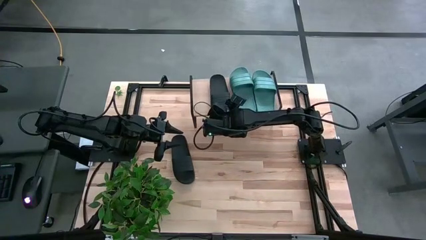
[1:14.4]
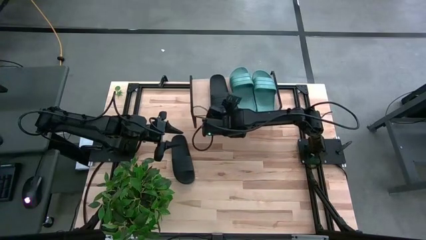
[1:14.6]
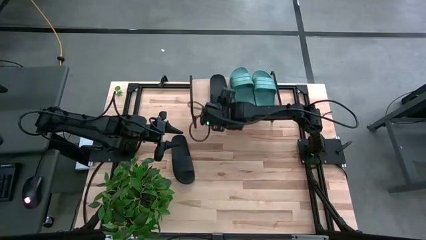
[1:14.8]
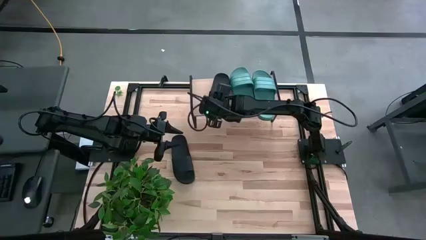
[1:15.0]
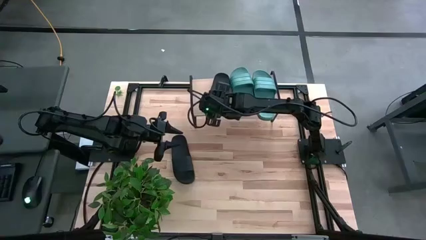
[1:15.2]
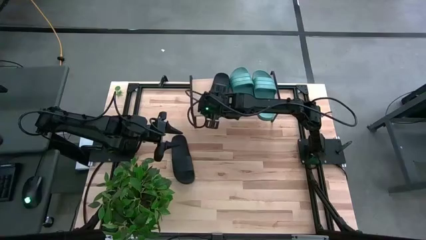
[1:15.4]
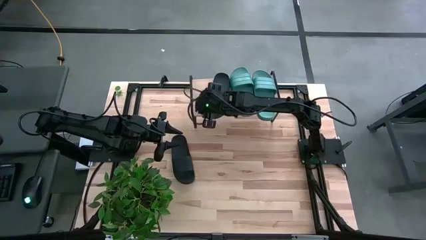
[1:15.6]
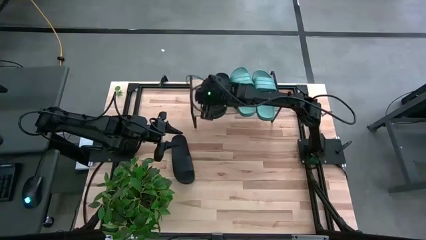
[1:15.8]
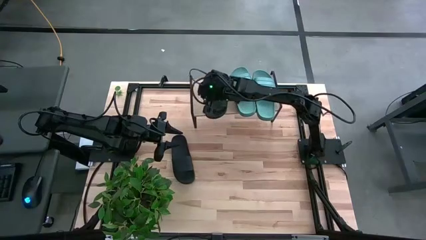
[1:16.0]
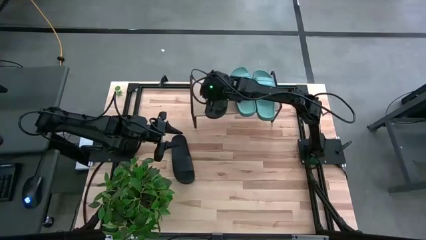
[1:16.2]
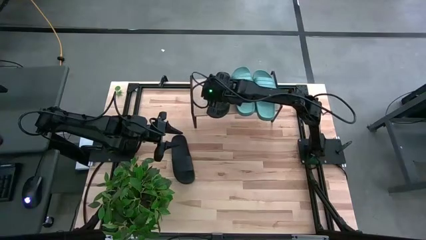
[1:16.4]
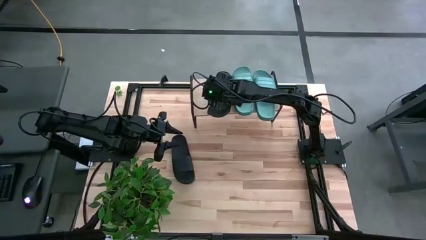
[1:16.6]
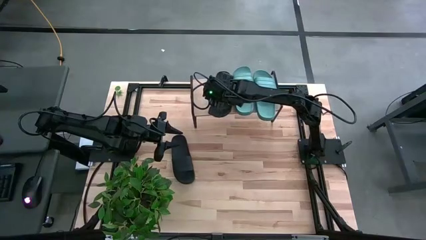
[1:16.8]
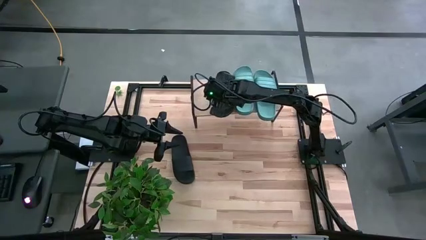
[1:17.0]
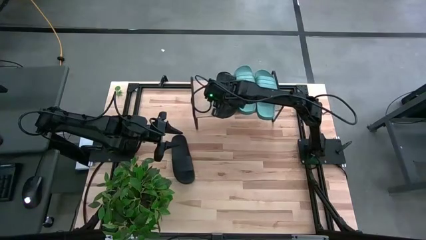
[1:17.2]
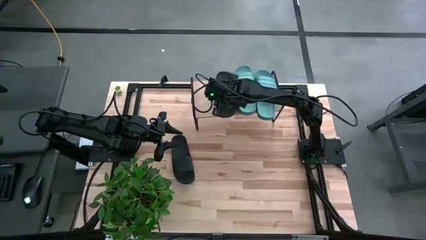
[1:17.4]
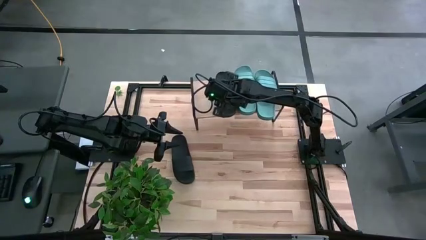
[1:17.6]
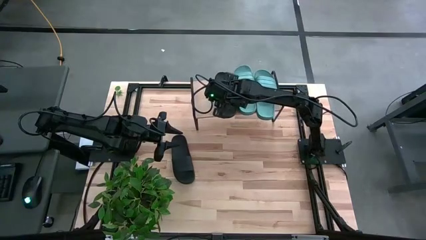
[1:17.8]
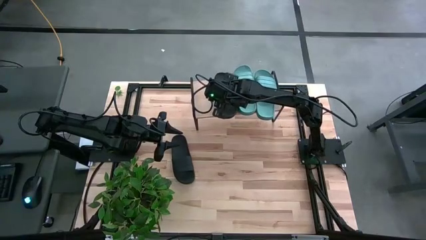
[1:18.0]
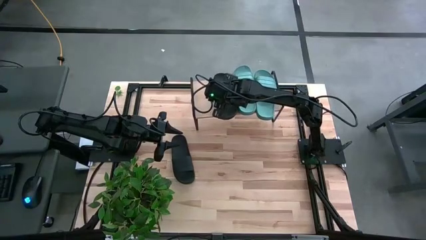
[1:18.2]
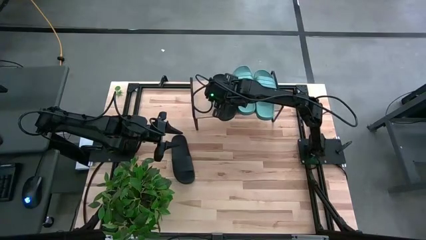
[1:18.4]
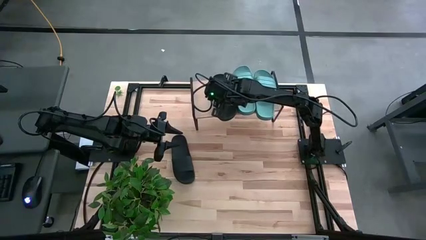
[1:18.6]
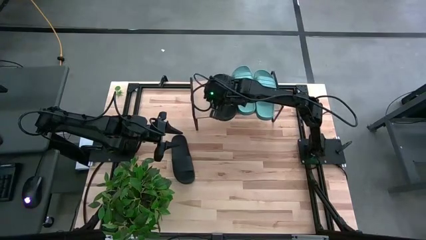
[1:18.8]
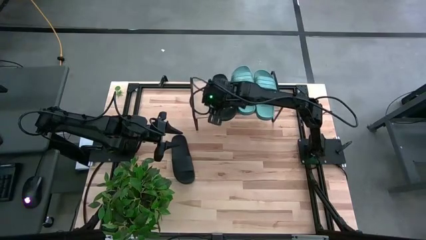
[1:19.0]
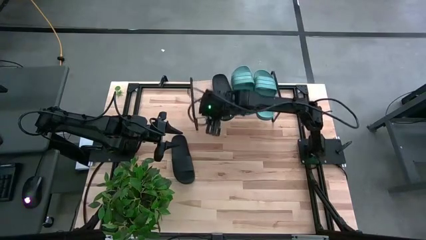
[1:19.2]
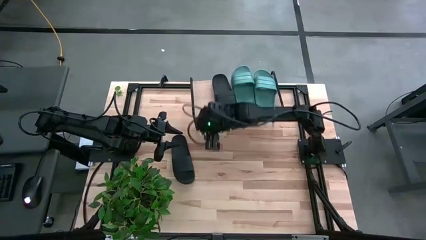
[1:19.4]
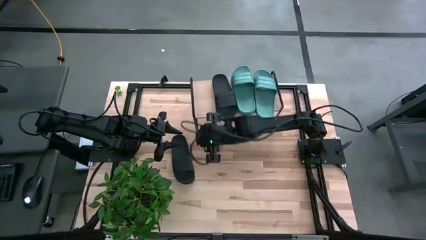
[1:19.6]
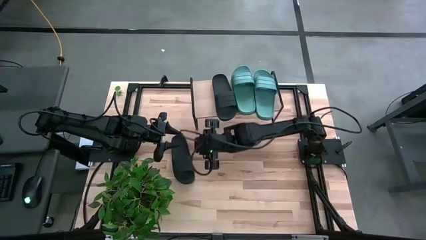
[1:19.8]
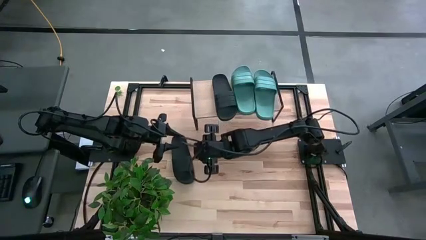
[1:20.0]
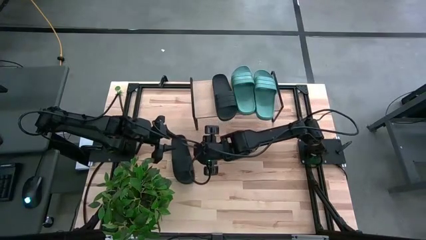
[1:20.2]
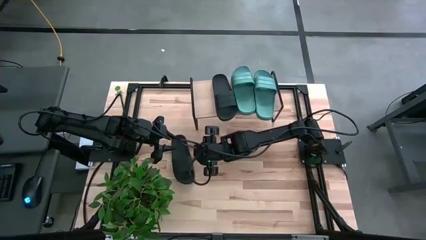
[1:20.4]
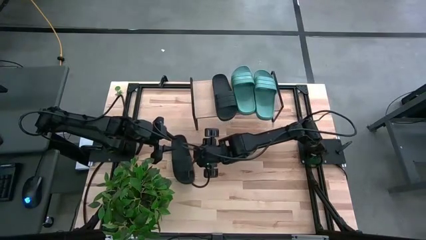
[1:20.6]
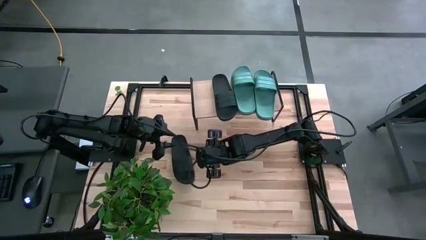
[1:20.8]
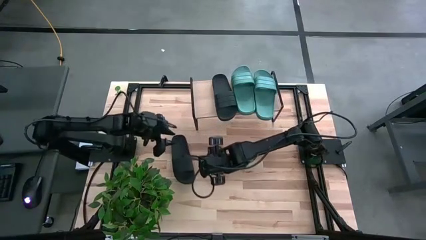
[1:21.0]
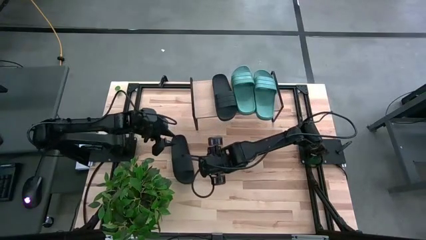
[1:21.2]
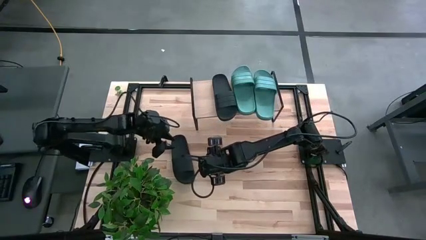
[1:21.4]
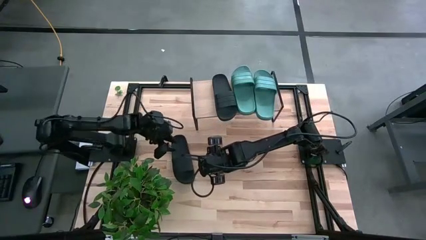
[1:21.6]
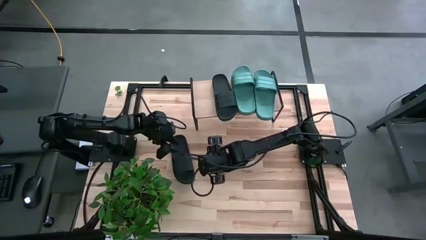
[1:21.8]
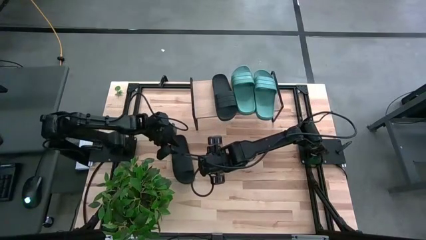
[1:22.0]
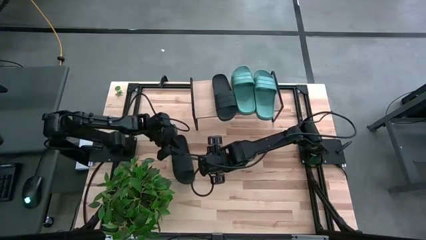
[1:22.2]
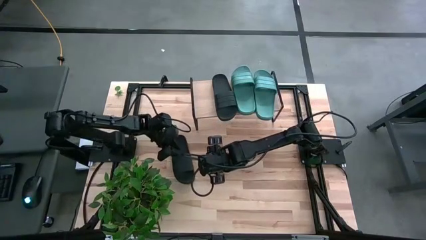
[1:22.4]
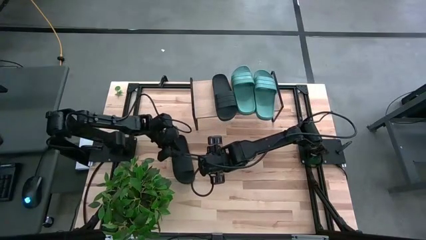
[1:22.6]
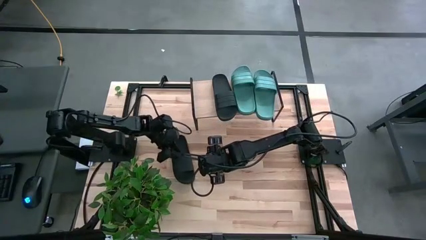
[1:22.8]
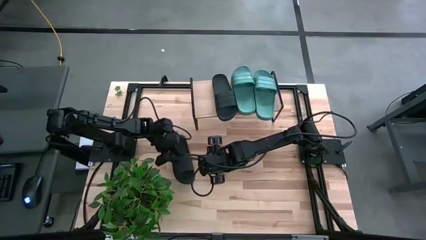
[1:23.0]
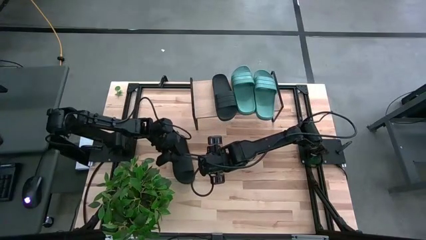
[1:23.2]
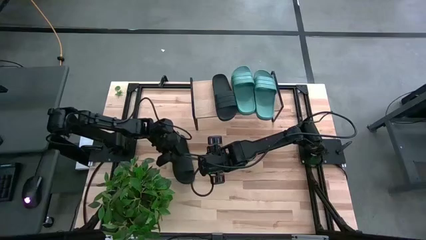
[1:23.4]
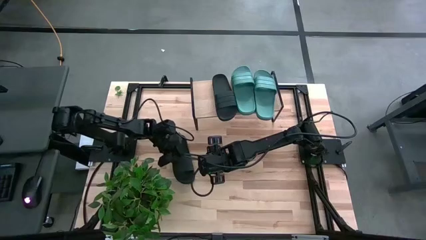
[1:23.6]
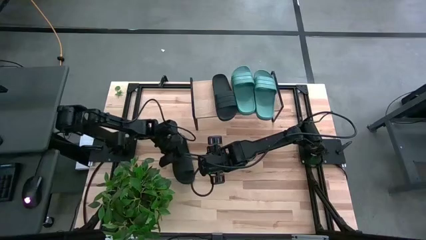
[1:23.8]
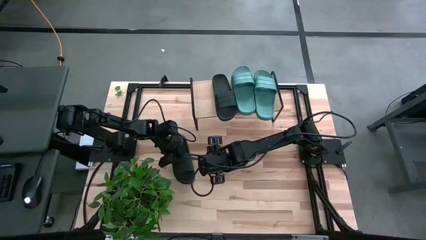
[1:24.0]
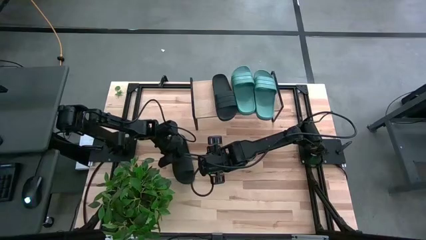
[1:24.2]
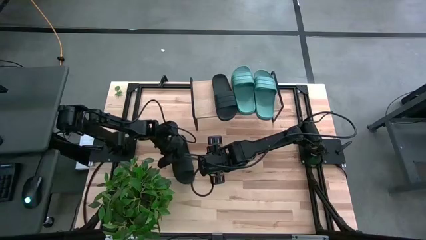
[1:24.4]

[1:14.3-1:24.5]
Task: Pick and place slides into the shelf
Put the dark green slipper on the shelf

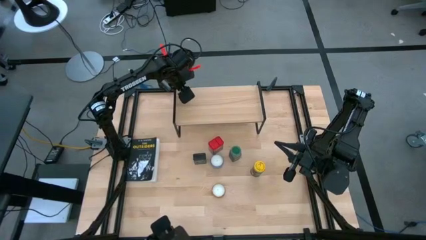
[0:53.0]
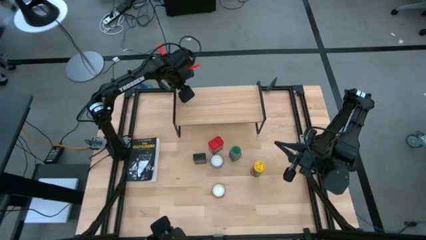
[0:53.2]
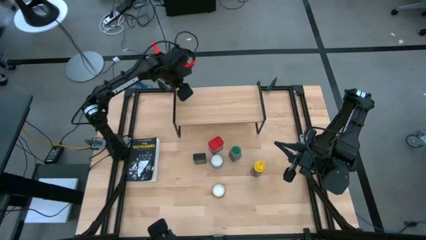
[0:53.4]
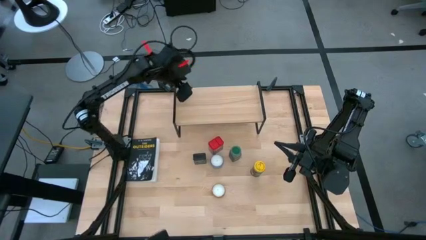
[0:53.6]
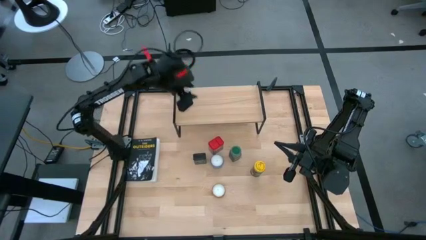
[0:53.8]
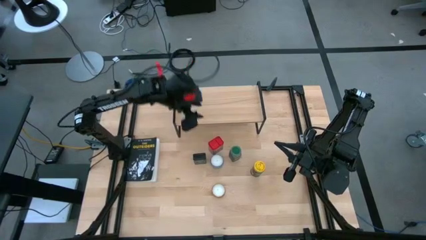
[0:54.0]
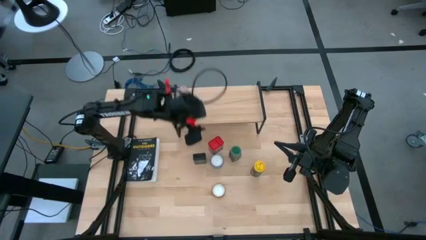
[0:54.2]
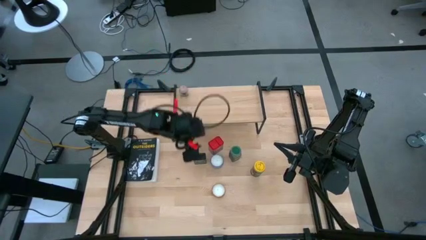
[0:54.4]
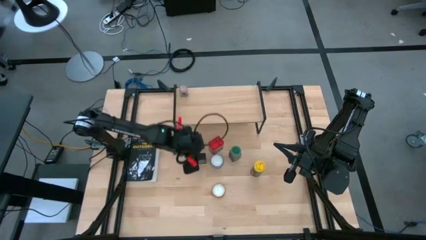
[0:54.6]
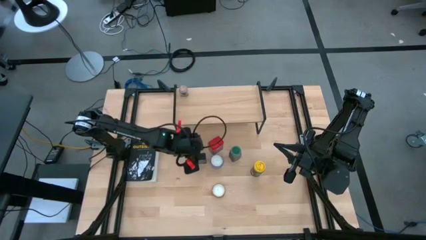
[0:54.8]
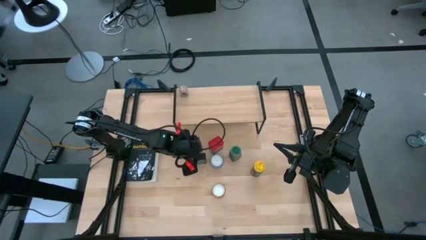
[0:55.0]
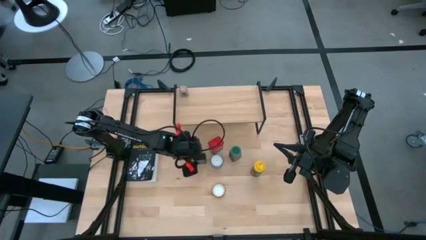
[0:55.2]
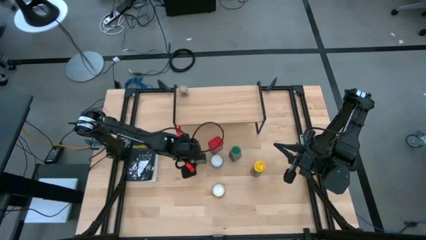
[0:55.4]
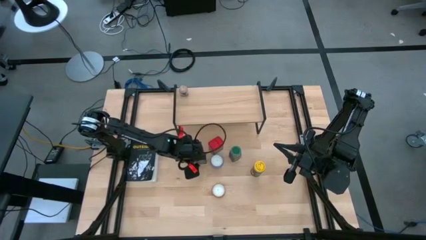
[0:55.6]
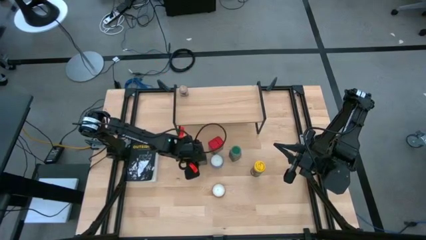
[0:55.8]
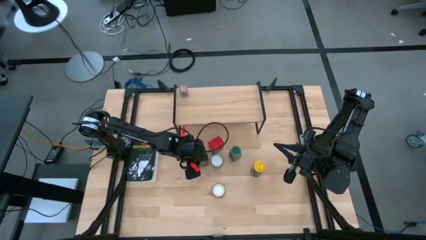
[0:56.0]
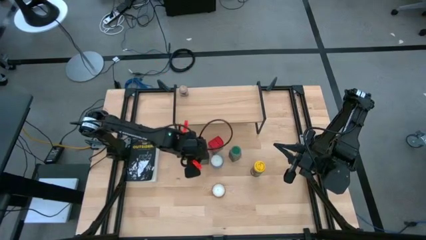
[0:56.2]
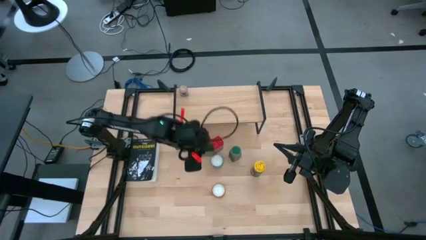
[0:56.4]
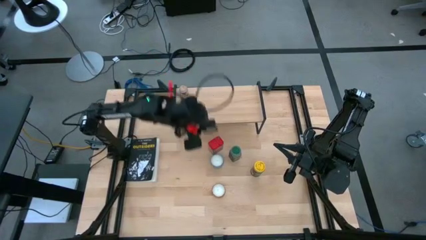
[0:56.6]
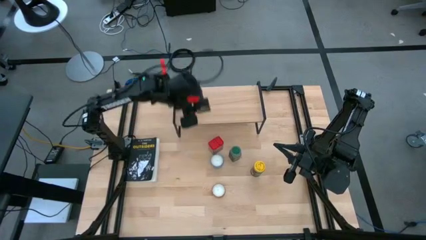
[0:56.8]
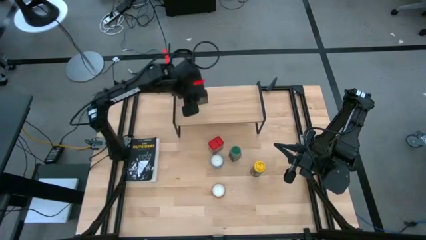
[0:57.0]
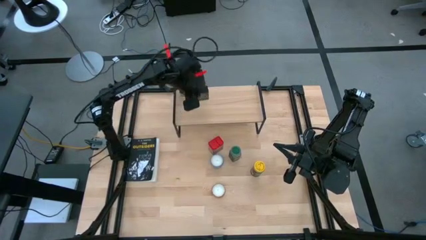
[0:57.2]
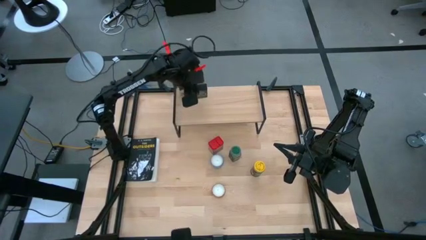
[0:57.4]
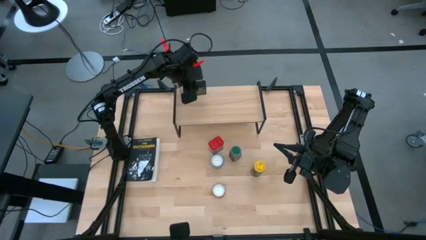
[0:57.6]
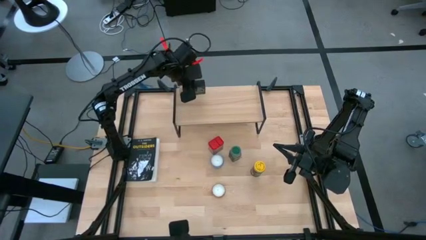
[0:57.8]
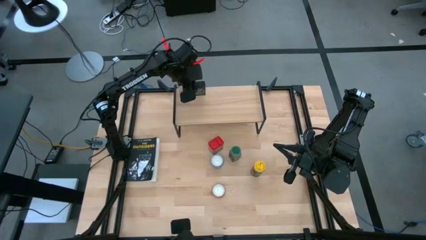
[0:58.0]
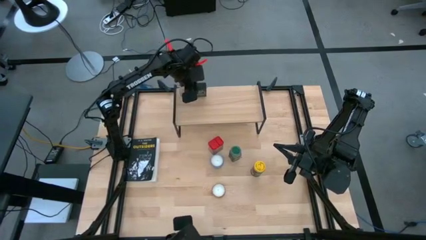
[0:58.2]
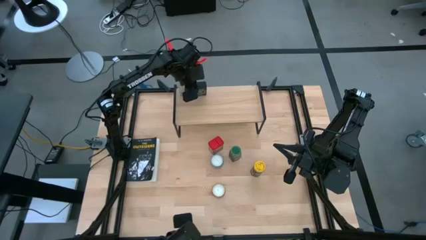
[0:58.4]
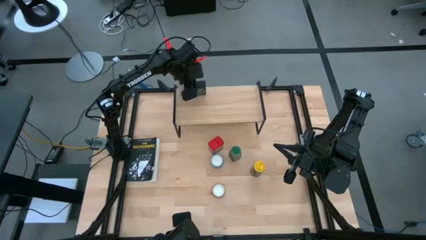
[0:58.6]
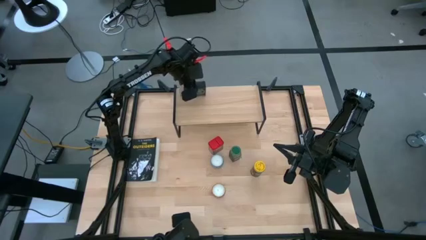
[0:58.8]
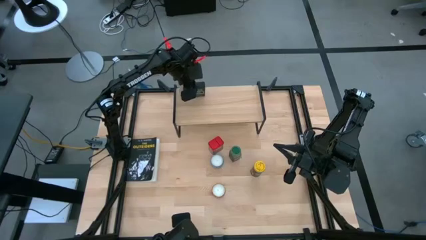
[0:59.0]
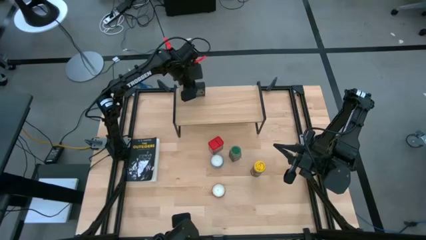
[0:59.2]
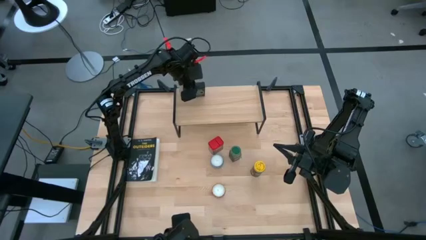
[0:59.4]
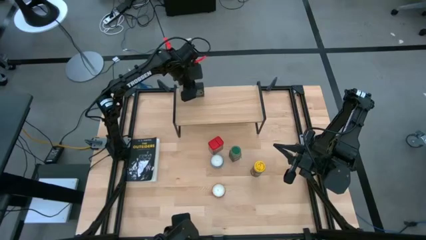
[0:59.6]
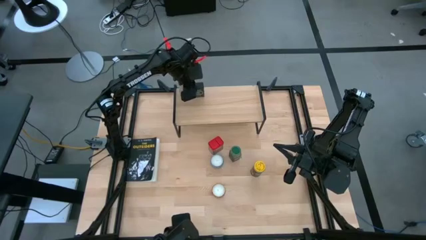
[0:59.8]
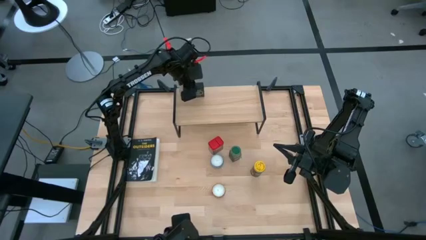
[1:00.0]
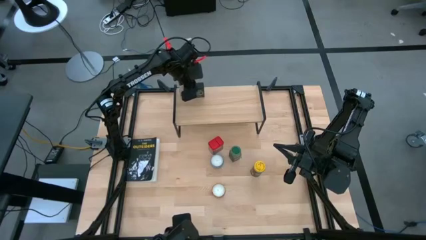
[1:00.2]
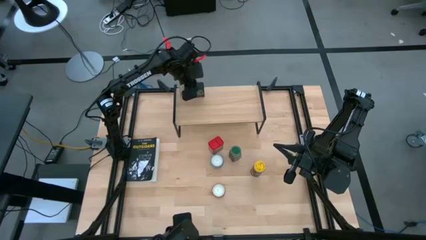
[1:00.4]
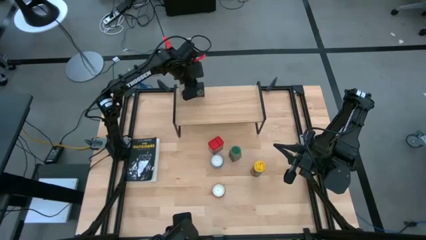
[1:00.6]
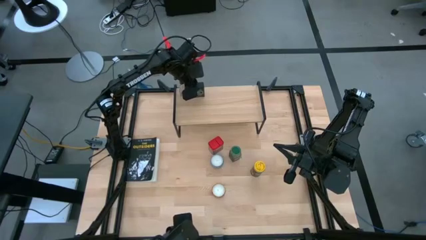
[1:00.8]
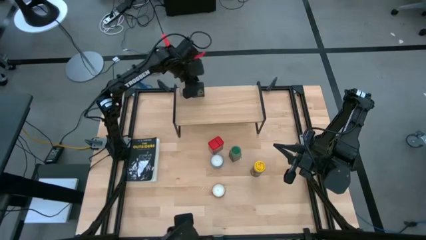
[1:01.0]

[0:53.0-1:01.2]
Task: Shelf spices
Put the black seasoning can on the shelf
